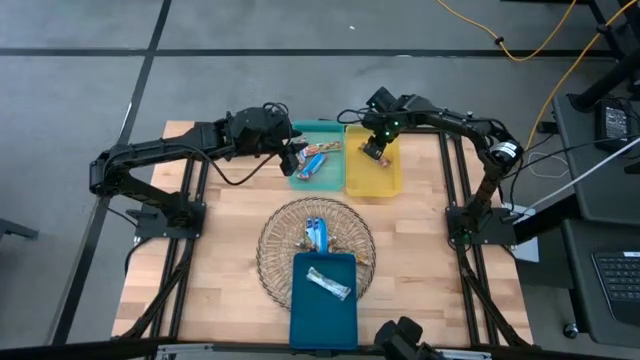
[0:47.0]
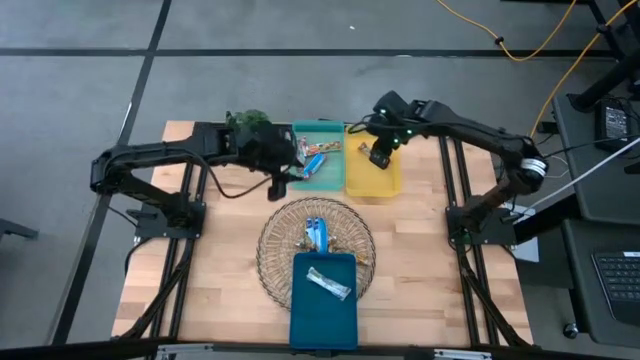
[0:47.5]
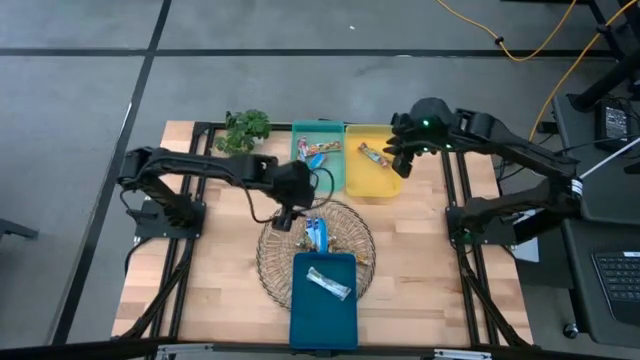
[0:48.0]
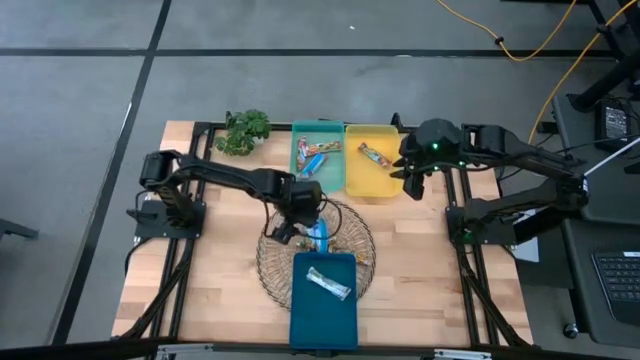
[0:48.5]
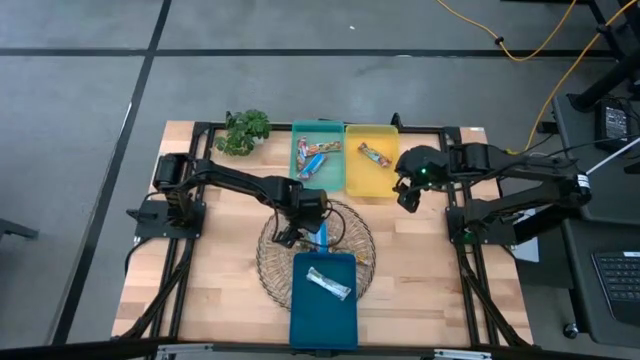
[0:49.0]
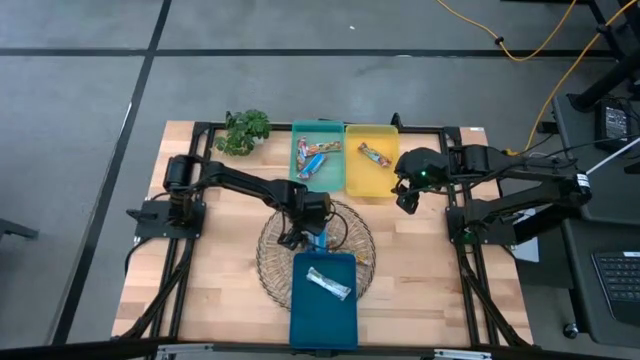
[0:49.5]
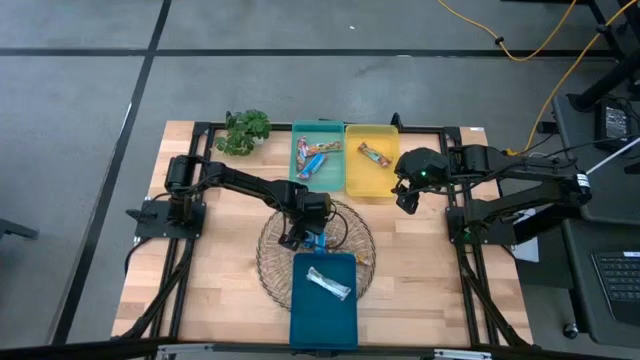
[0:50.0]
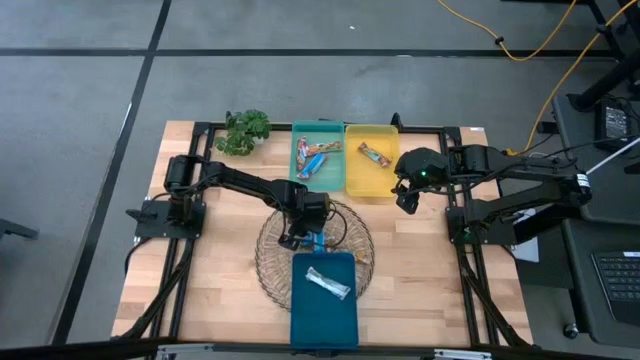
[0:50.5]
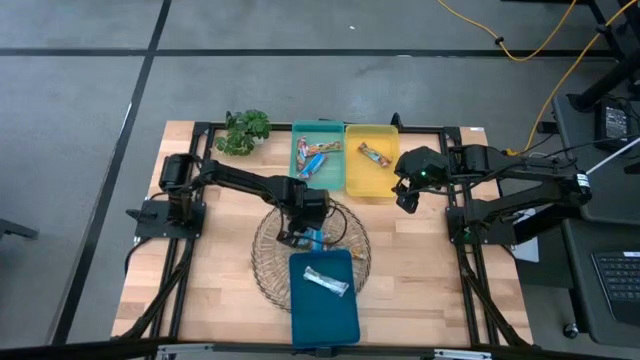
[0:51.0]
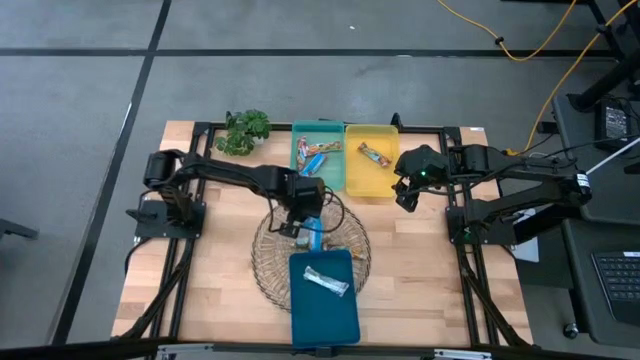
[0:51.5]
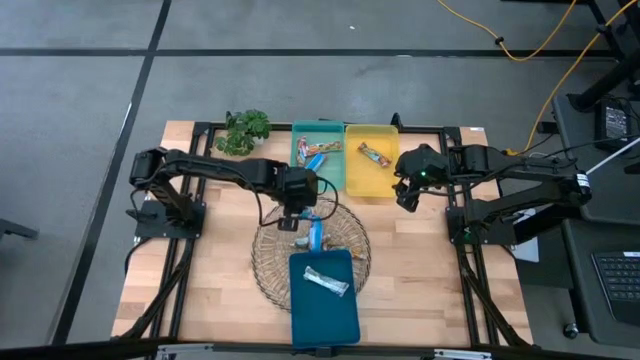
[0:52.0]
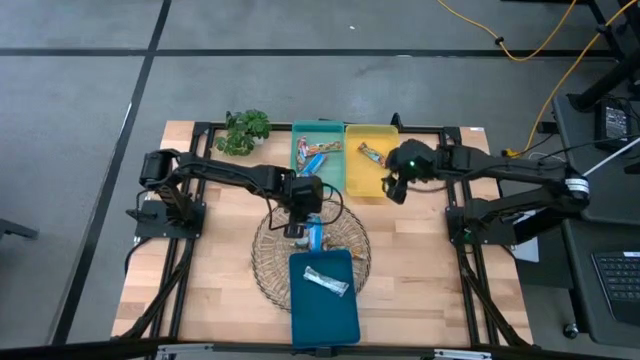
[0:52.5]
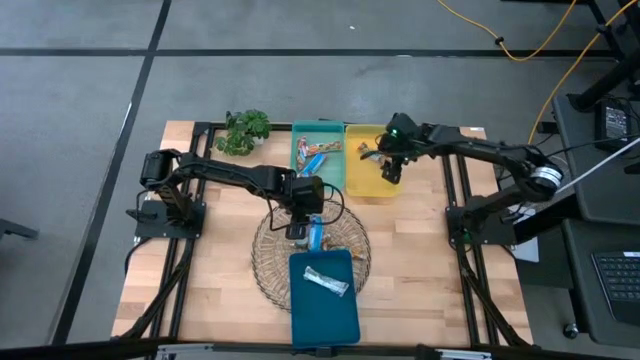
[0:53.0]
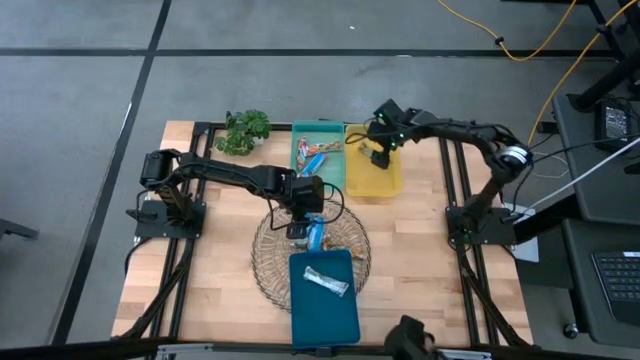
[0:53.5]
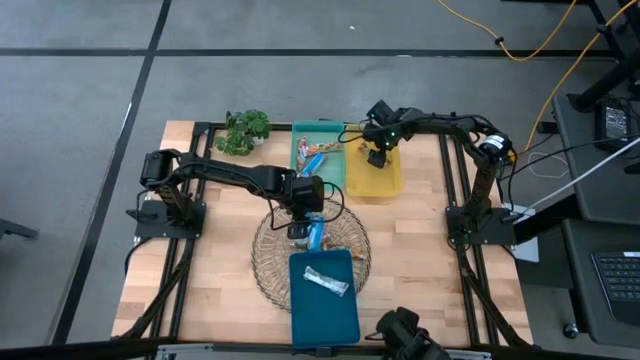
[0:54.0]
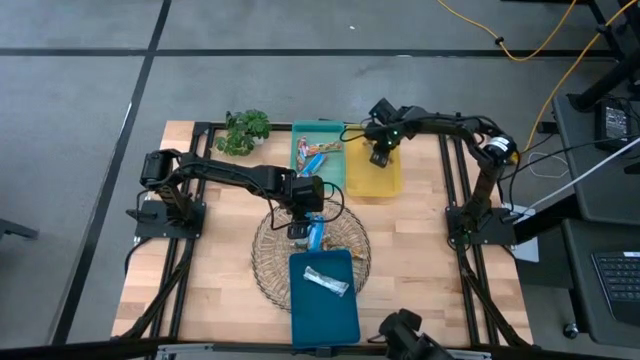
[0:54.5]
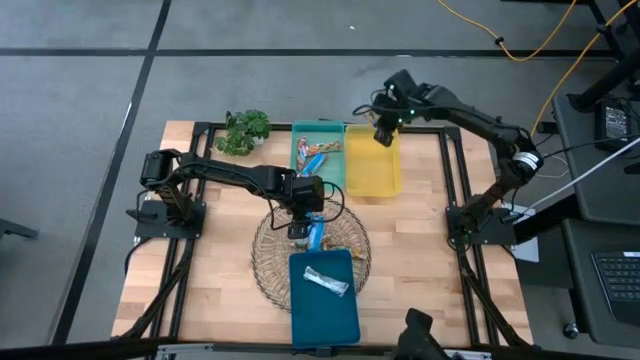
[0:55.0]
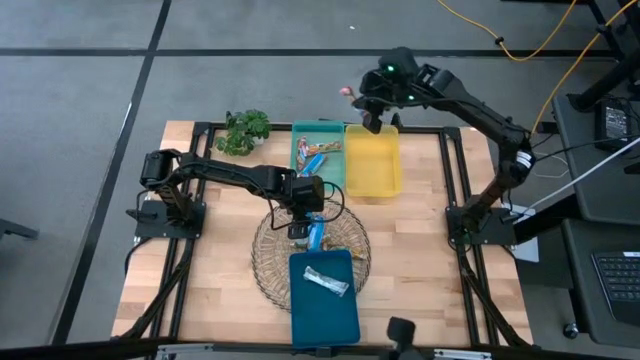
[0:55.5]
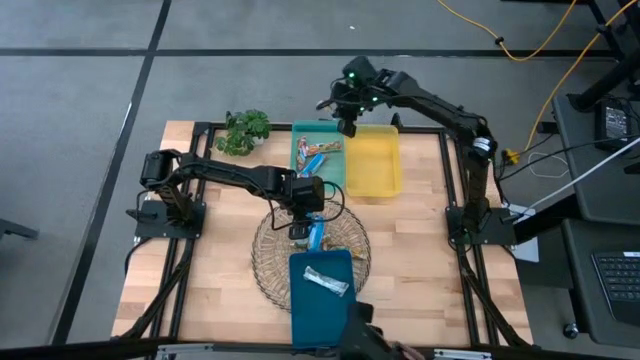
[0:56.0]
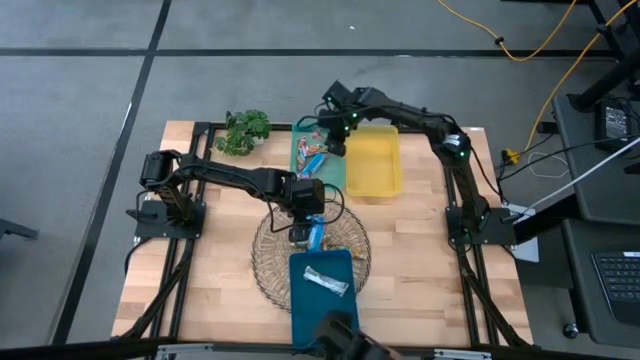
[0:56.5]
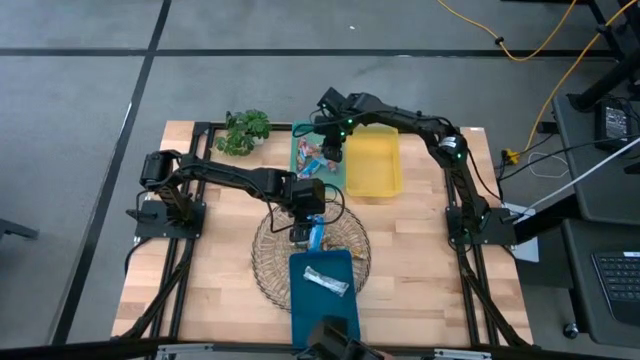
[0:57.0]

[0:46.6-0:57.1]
Task: Pick and place Granola Bars by type
Put the red granola bar into the green container

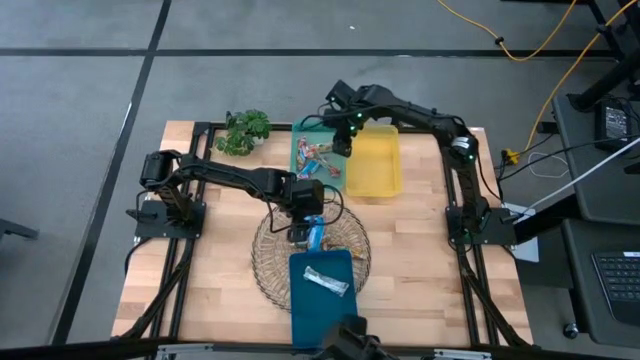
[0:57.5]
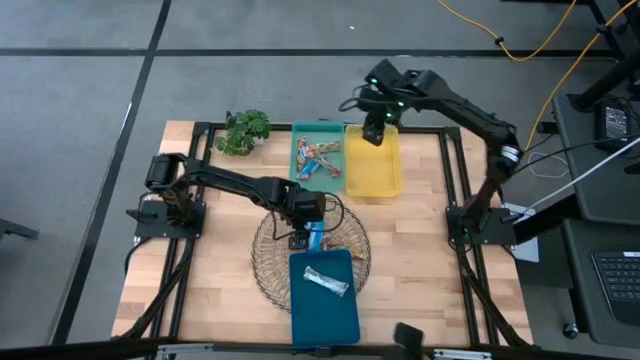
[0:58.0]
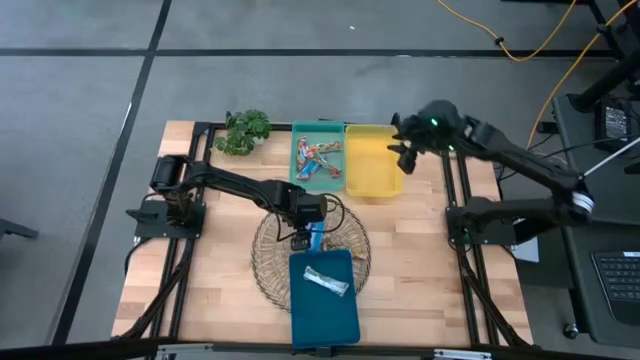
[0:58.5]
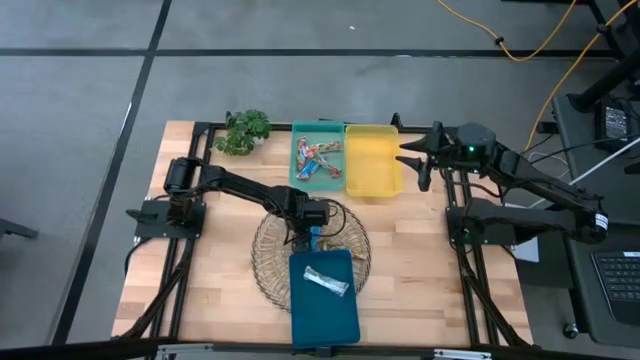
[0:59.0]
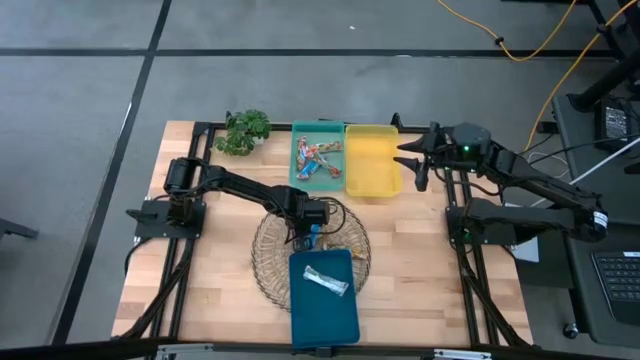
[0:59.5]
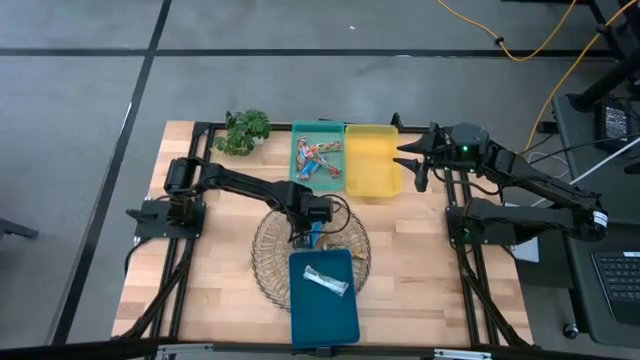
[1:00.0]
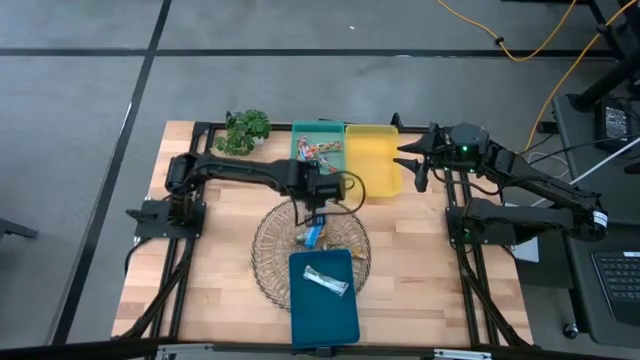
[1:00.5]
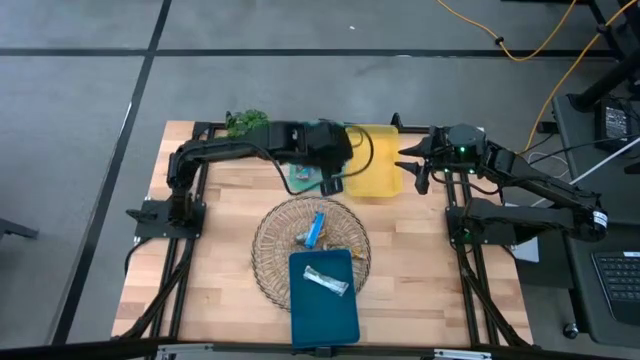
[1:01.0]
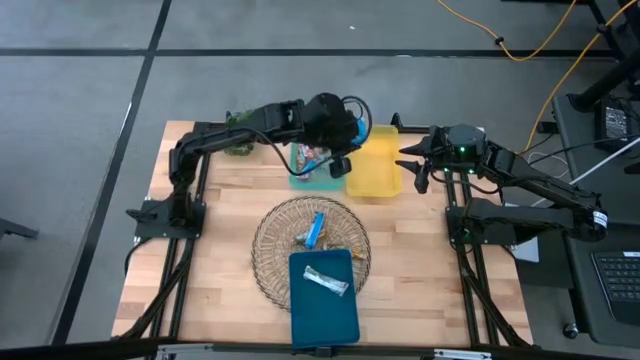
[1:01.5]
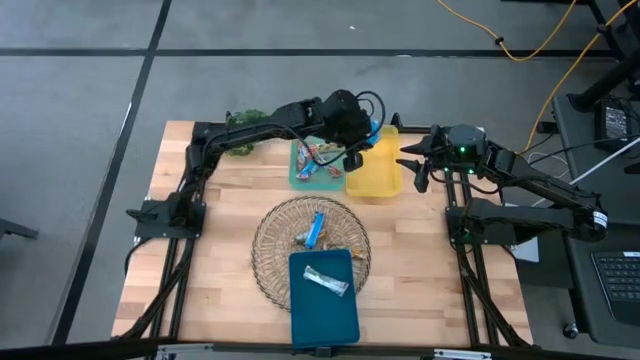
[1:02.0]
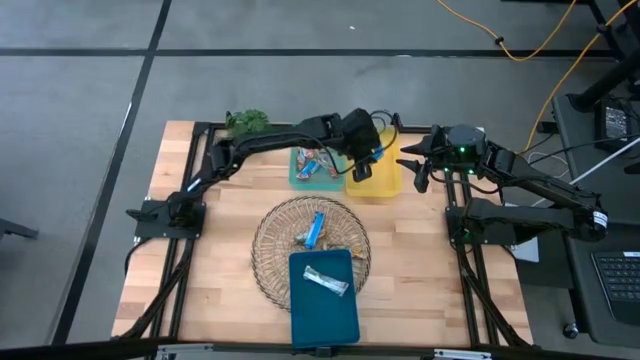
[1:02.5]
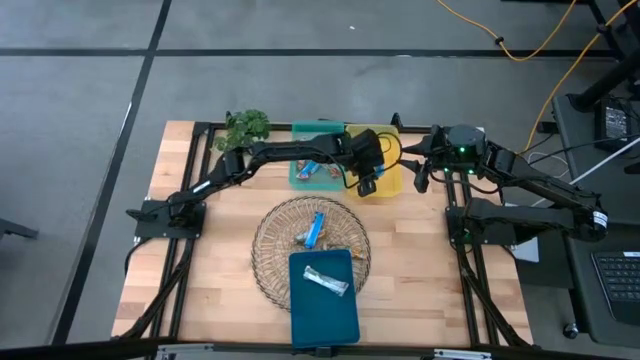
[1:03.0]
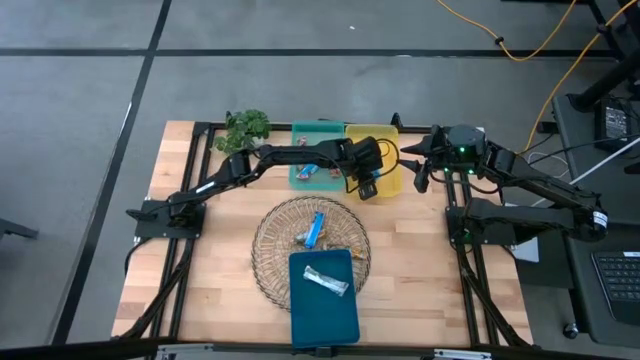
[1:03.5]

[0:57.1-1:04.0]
Put the blue granola bar into the yellow container

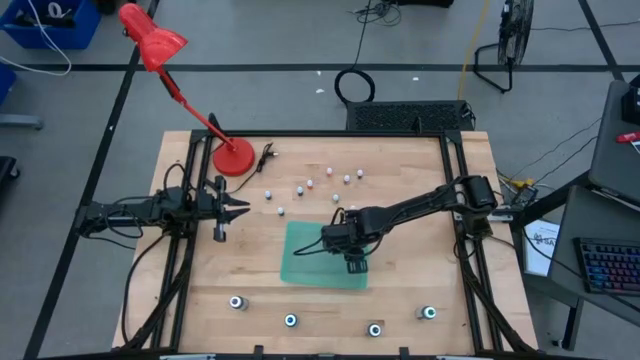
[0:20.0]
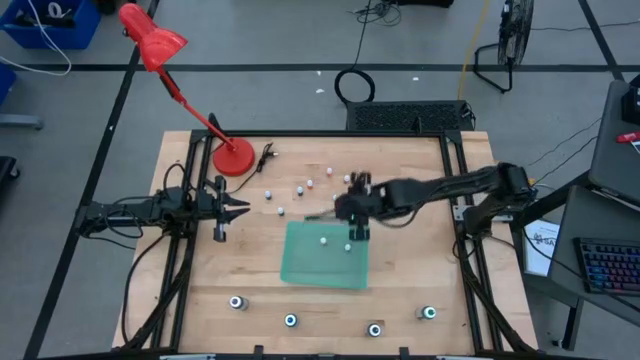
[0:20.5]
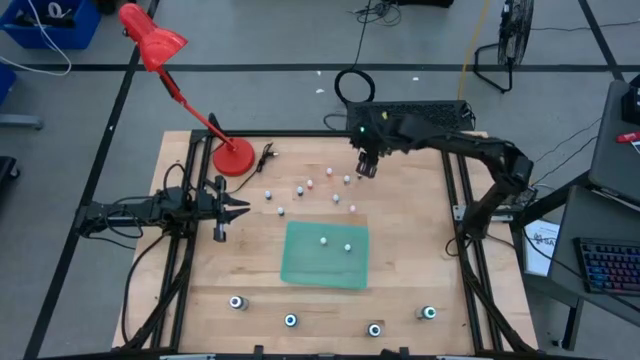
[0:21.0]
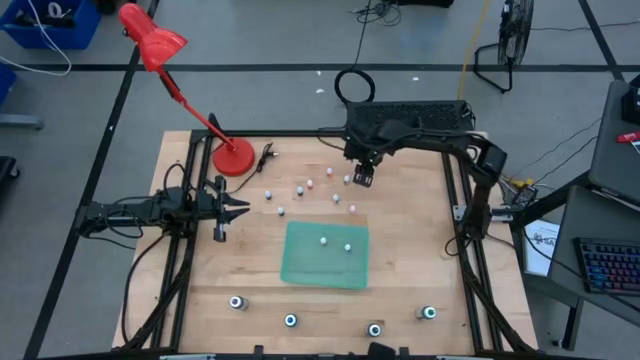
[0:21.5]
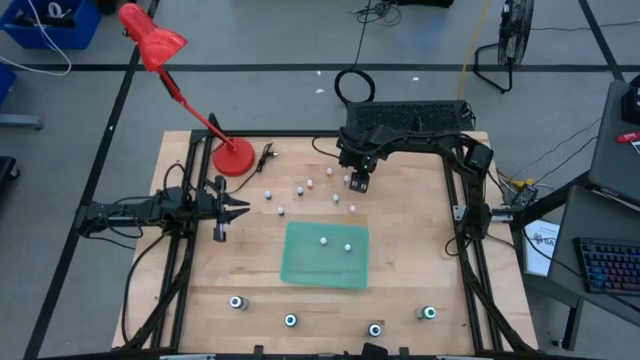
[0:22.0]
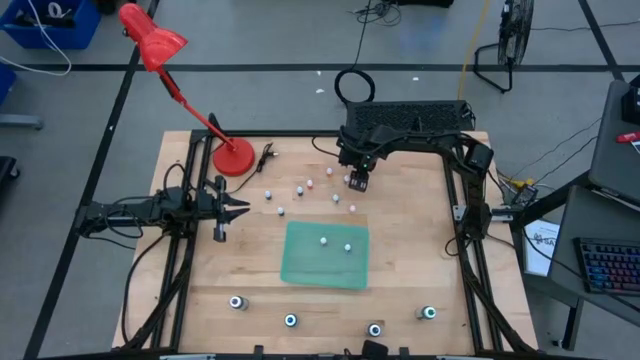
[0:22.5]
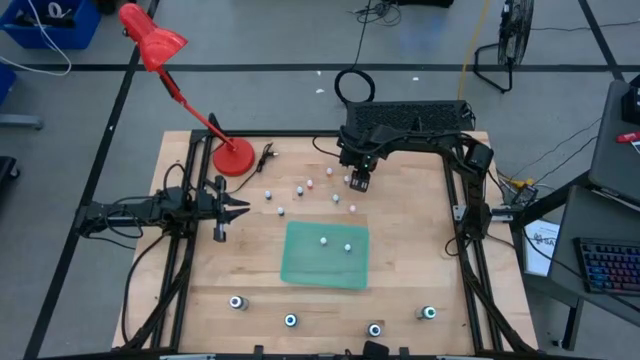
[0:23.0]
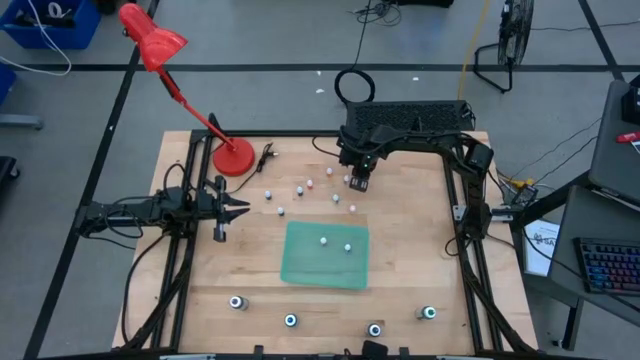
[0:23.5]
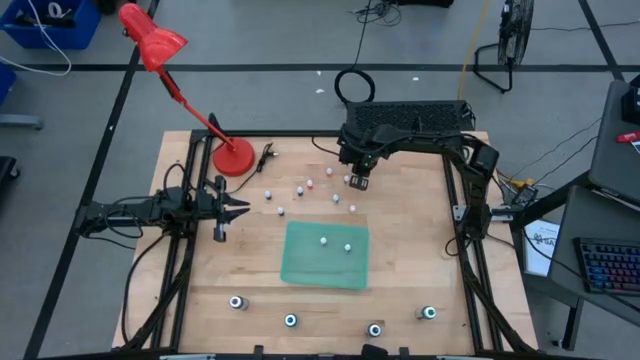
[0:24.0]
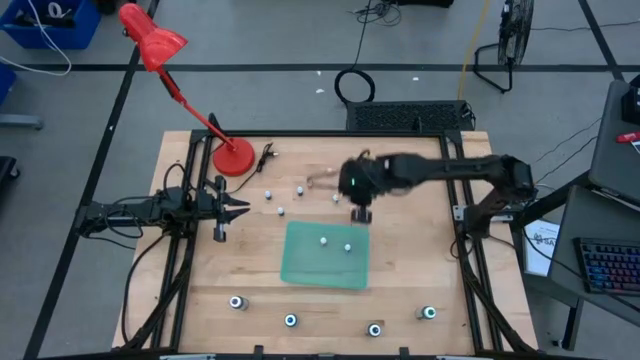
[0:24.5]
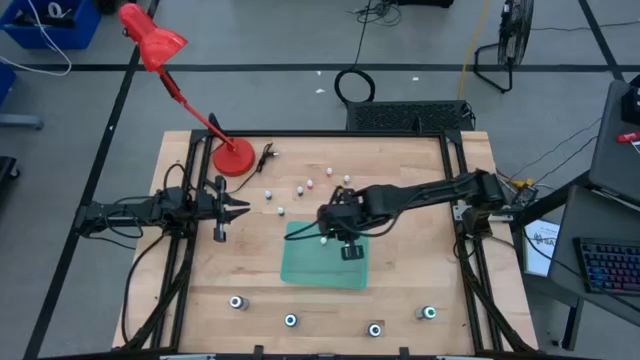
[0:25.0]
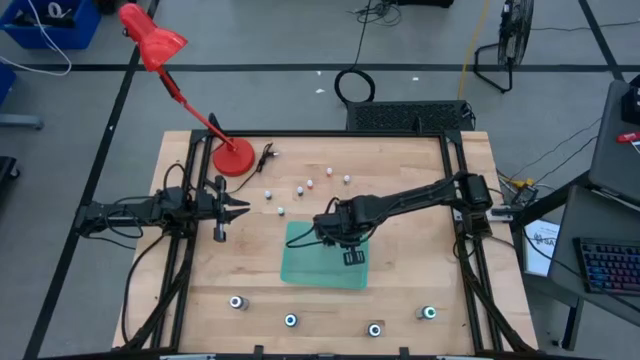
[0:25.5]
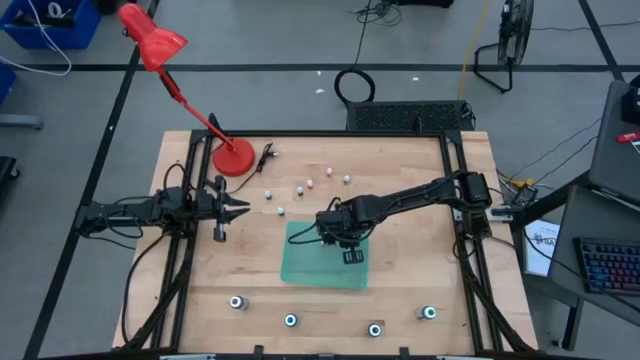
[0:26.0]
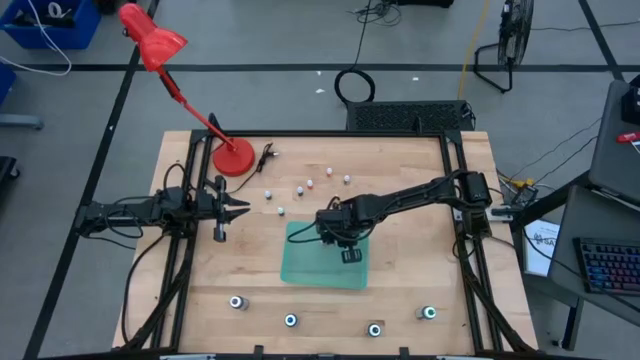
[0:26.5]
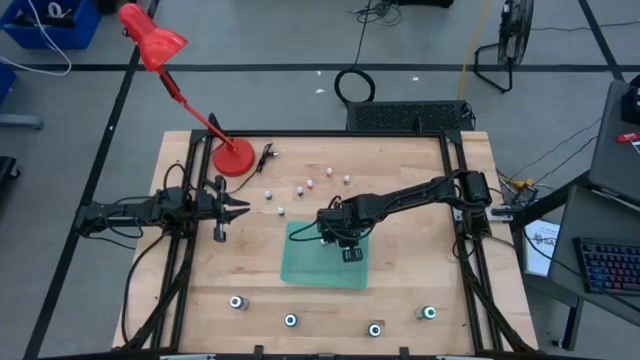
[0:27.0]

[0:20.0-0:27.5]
Task: Pick & Place food coloring
Put the small red food coloring bottle into the green bin
